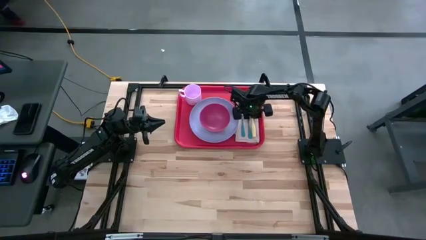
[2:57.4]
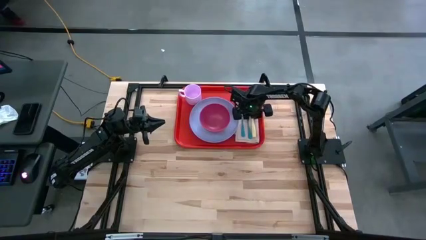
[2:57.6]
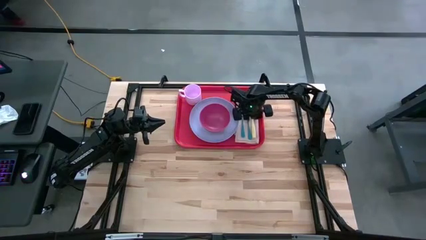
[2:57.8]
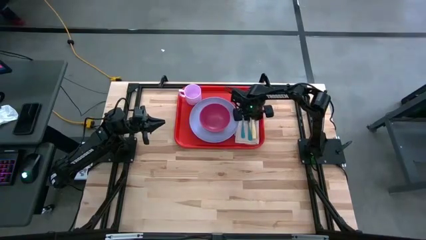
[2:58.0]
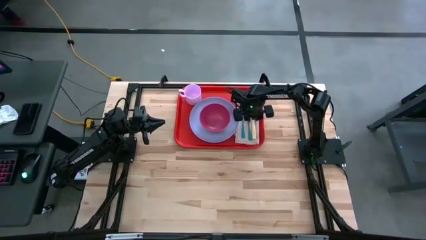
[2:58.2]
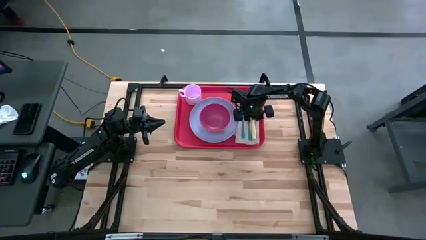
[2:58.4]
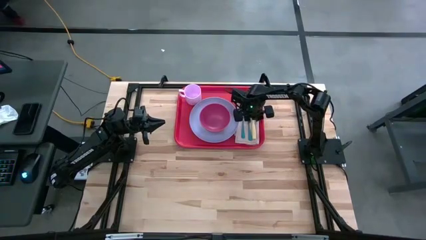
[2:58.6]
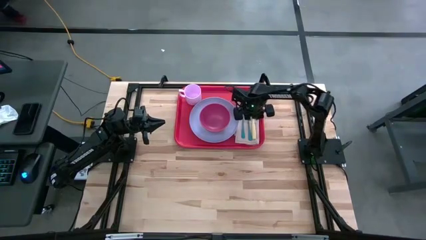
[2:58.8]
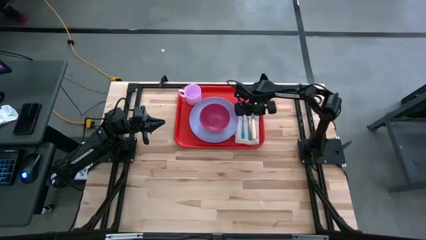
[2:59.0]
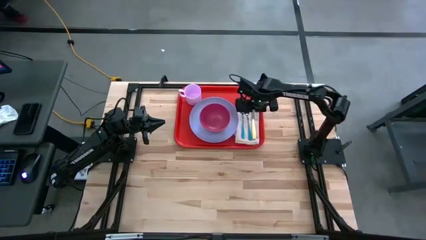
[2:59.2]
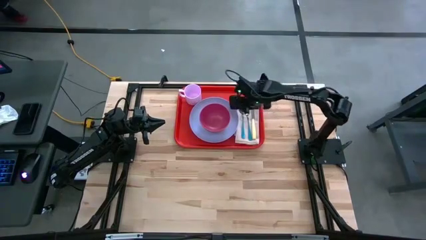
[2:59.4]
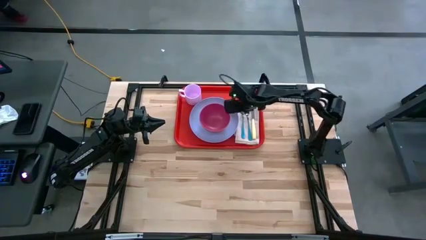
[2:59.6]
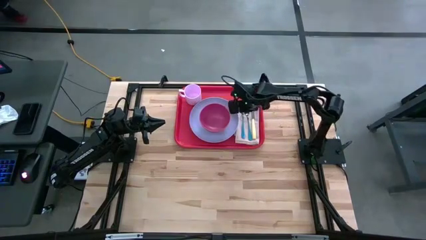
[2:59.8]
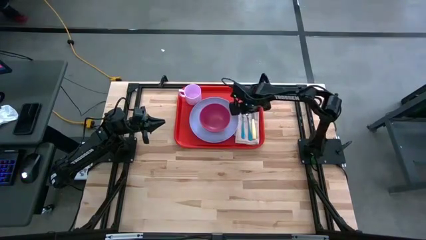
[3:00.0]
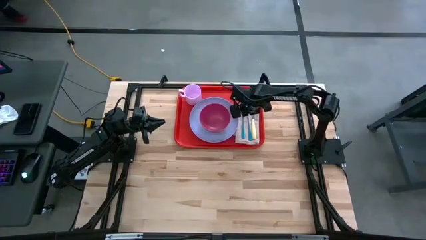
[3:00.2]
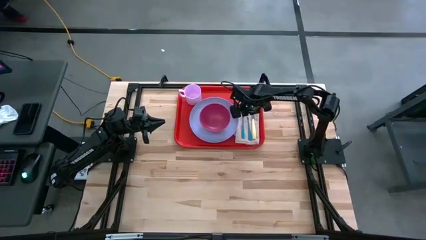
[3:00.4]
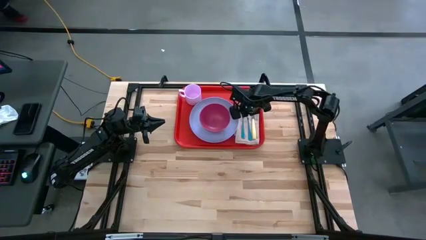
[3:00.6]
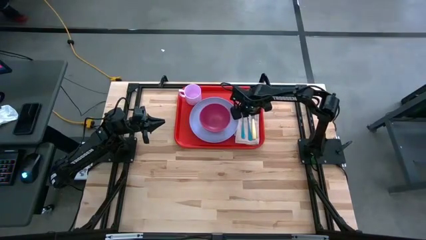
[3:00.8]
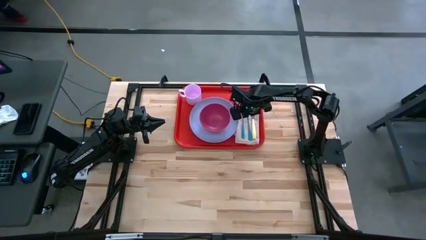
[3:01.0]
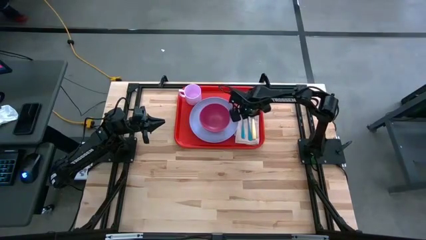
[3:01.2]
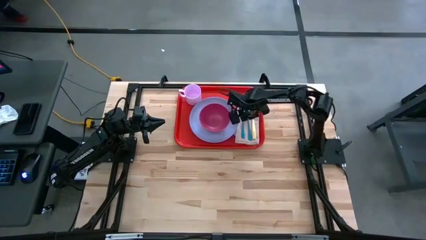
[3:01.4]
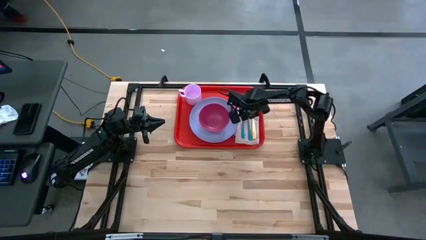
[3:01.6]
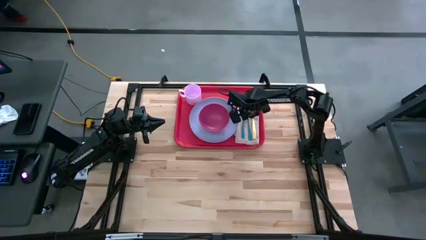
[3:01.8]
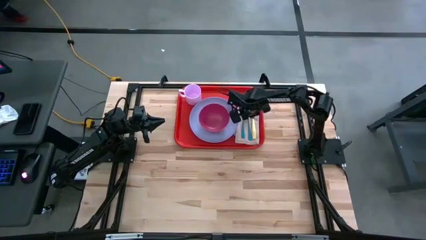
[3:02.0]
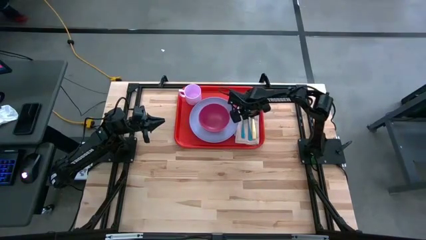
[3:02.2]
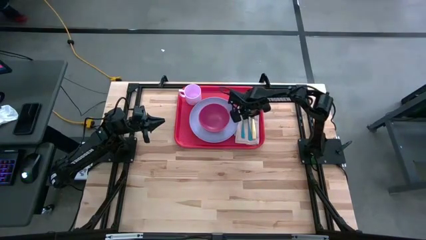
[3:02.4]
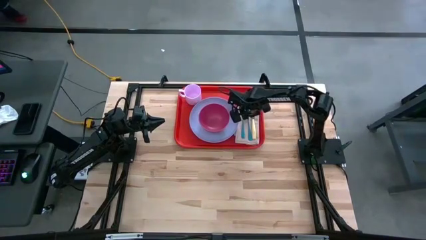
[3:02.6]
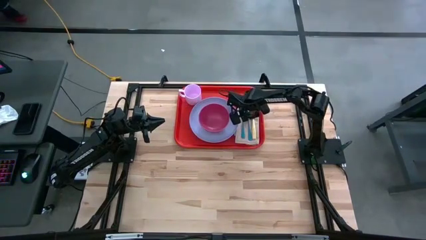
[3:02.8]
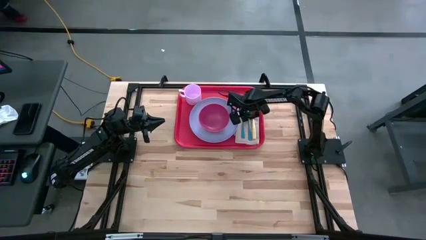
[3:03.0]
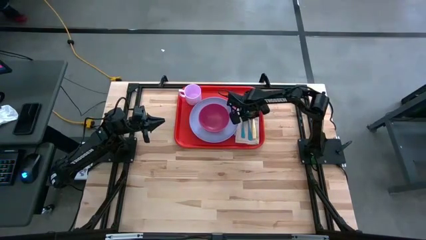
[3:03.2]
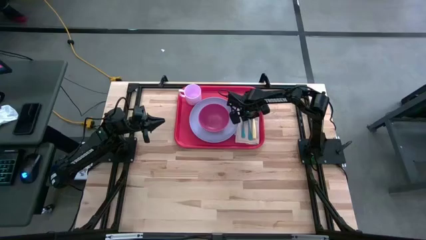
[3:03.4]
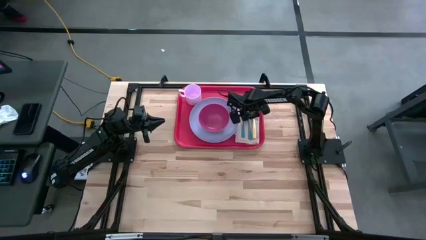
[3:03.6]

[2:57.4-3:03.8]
Task: Set up tray
Adjust the blue fork

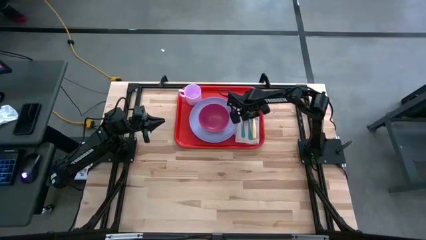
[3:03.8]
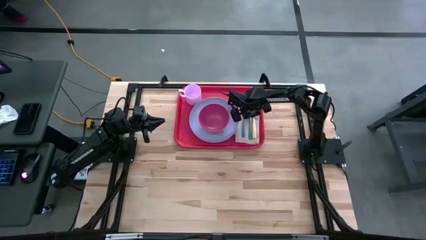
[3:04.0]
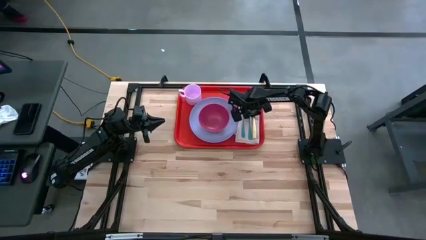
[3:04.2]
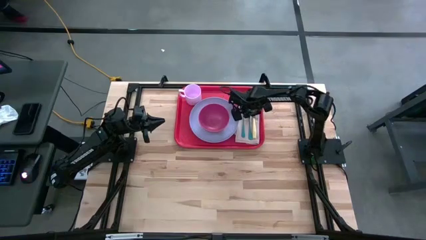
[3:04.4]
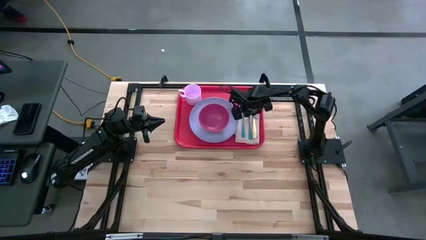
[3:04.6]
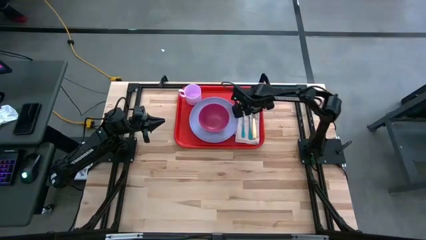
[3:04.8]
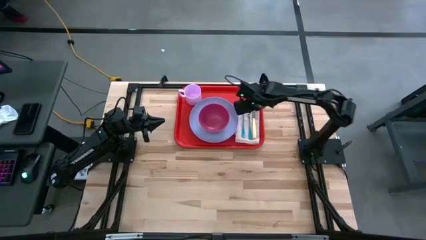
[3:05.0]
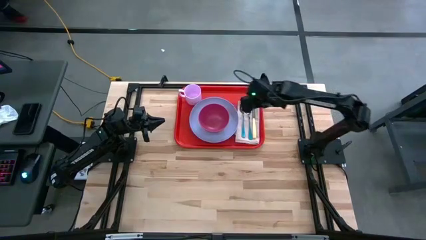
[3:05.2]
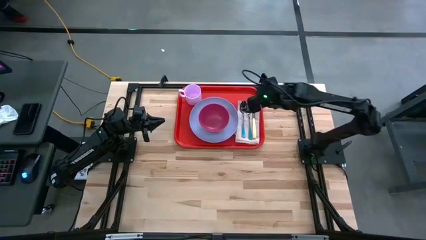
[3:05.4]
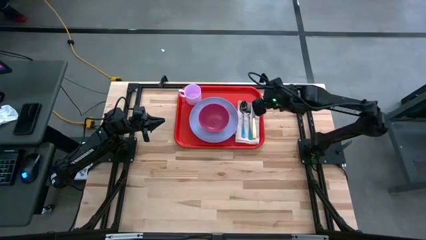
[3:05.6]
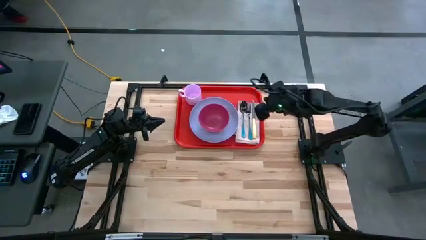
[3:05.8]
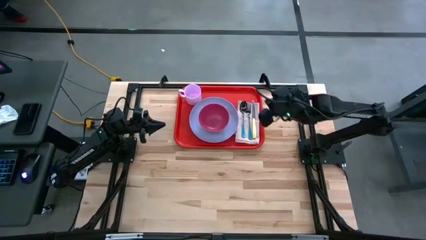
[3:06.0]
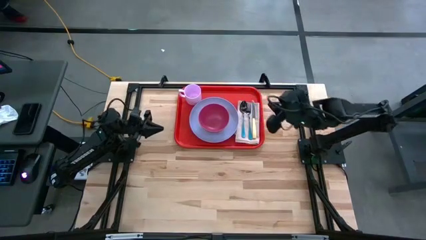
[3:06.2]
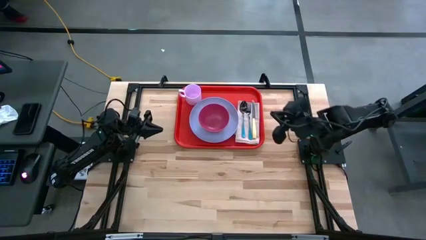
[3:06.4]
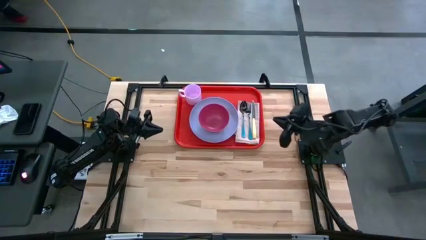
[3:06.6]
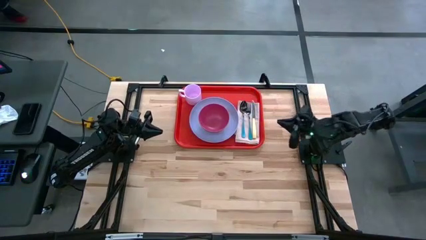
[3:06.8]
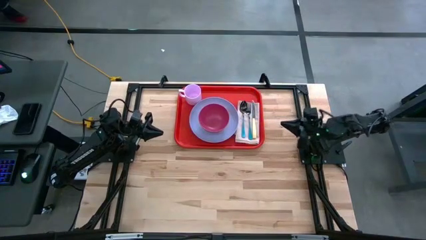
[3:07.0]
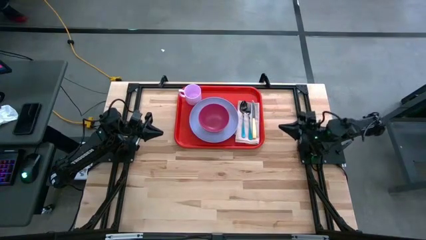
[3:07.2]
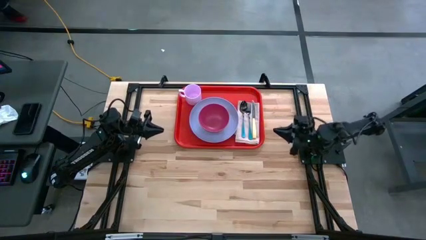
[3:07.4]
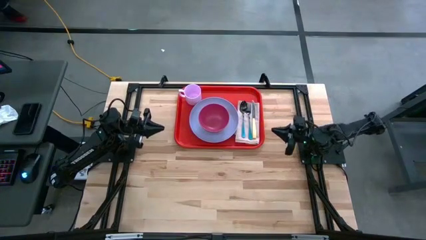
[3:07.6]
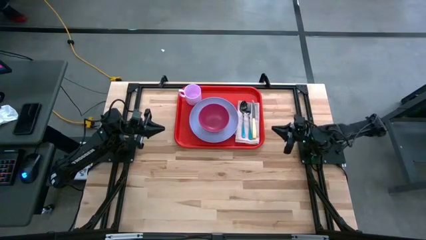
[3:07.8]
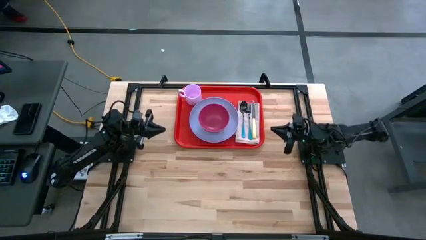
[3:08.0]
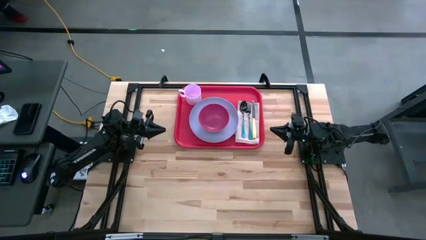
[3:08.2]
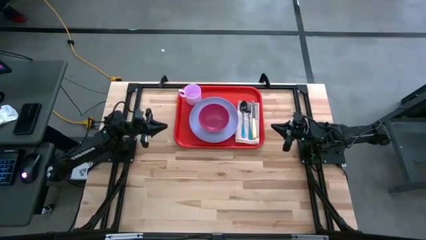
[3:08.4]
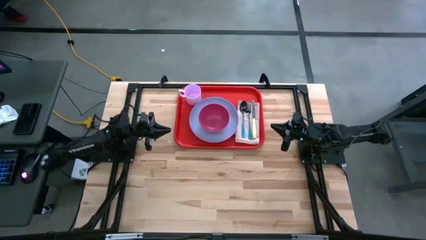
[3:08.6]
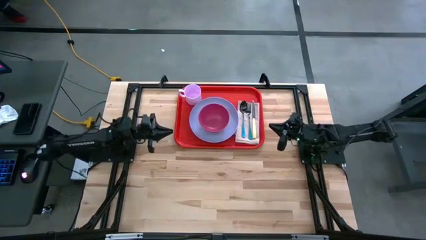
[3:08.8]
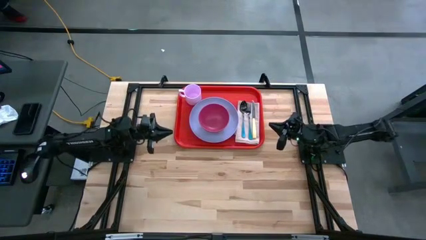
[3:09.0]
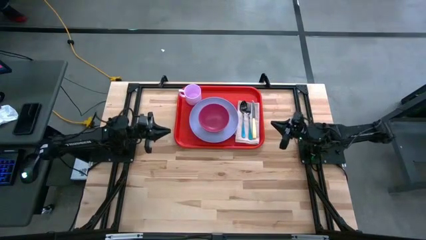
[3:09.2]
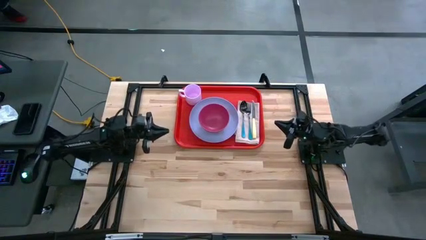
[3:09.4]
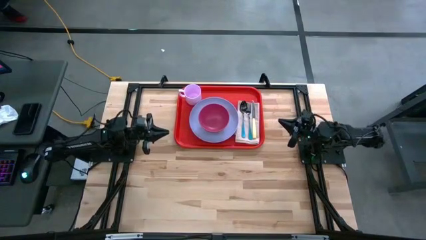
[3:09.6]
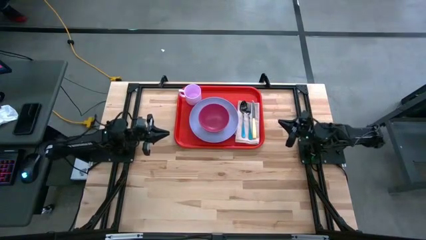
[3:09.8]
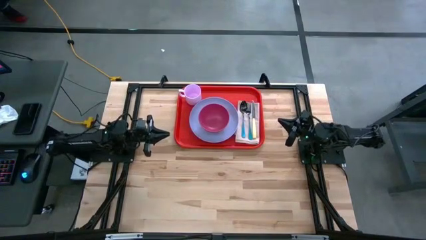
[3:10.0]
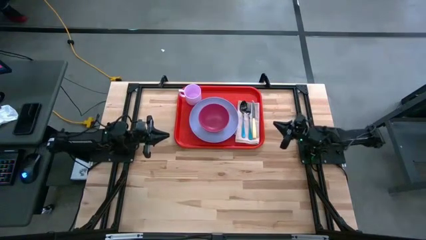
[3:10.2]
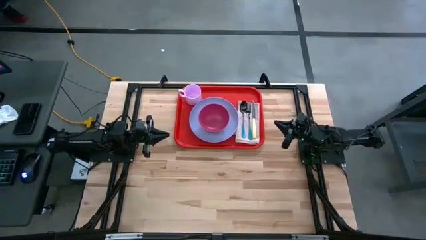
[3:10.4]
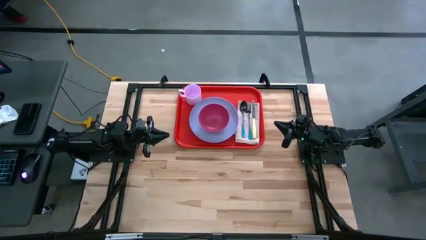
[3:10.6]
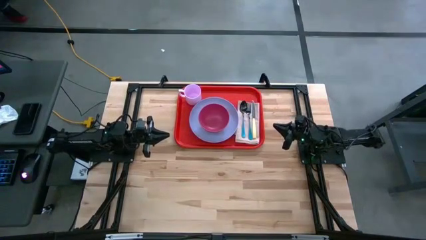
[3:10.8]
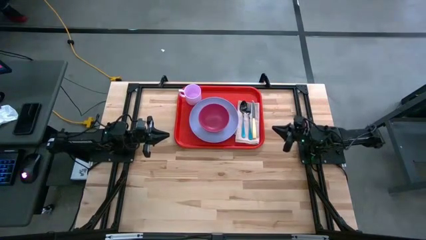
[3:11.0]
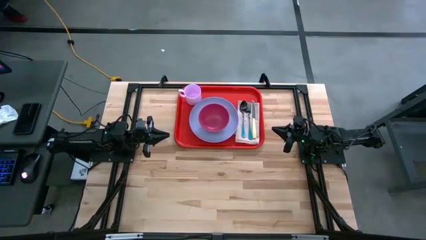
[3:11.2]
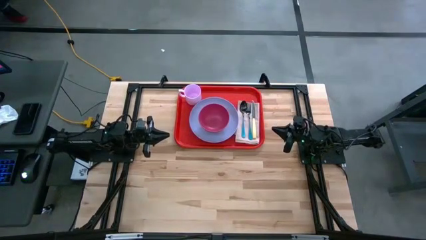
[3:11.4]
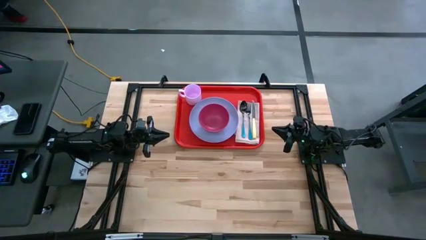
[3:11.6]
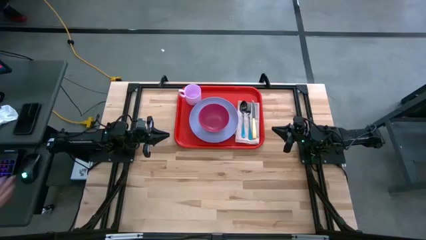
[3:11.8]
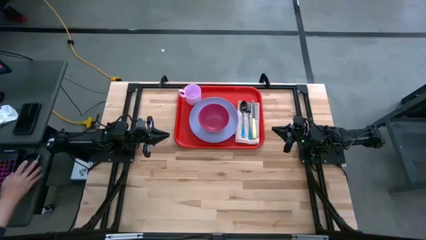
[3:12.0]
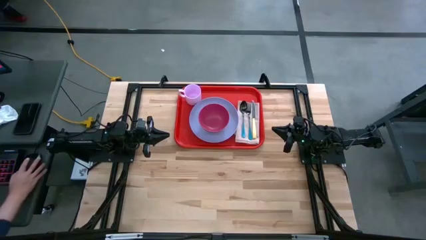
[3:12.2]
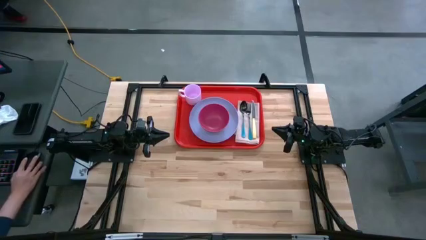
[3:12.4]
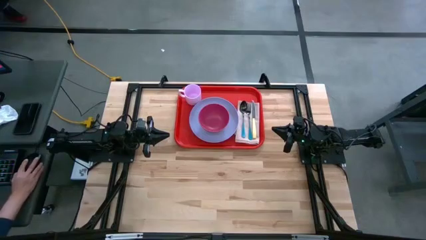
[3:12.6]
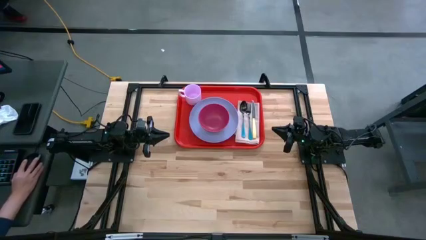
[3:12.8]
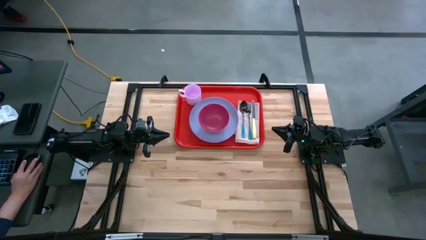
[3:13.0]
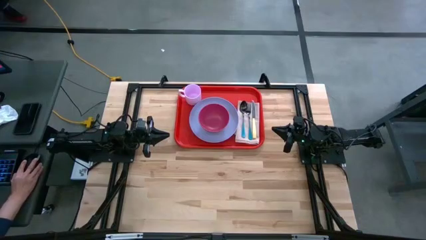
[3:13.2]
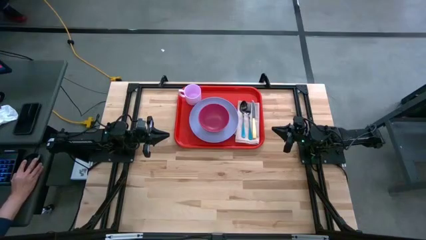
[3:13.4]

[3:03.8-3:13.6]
Return to Home Position
